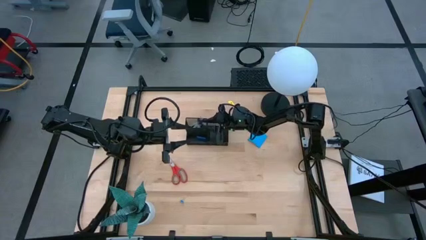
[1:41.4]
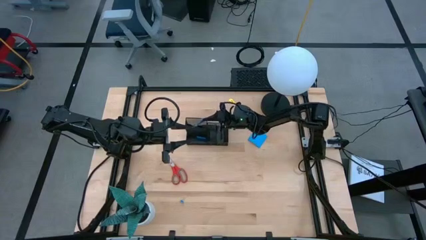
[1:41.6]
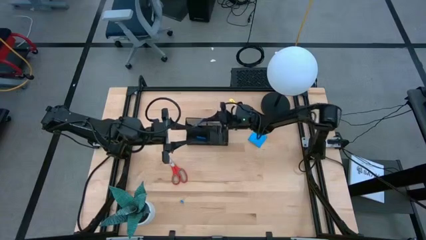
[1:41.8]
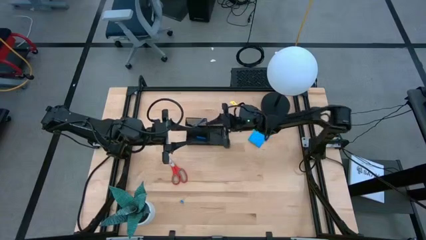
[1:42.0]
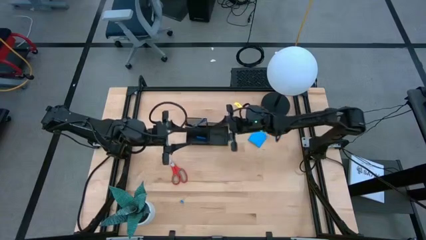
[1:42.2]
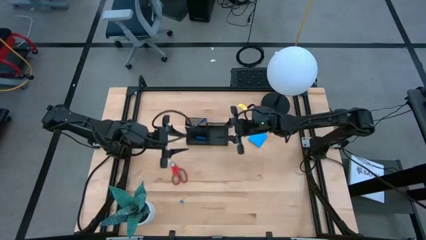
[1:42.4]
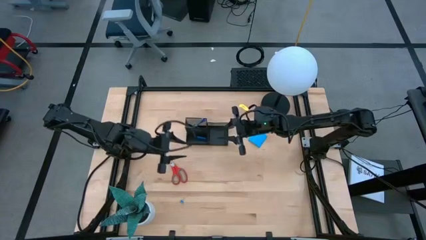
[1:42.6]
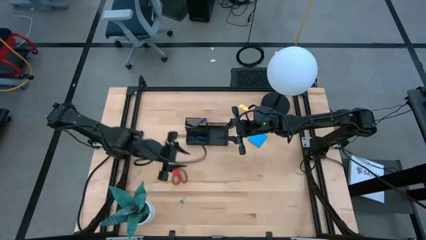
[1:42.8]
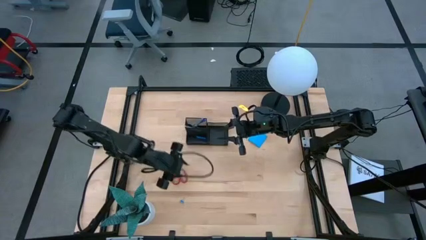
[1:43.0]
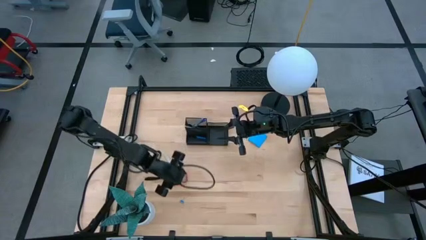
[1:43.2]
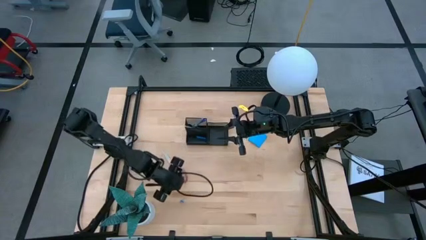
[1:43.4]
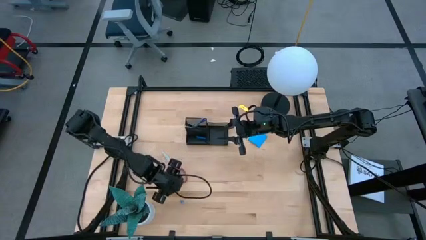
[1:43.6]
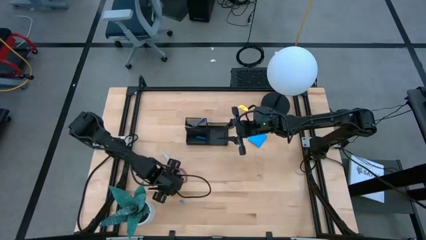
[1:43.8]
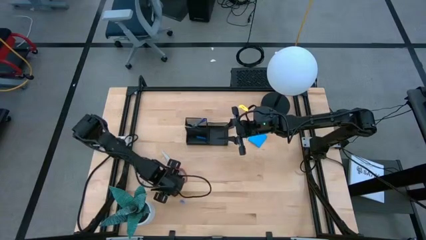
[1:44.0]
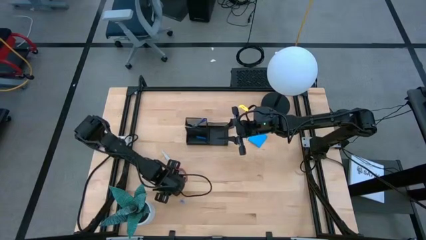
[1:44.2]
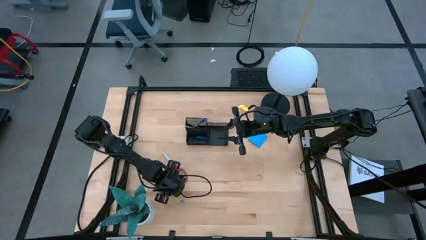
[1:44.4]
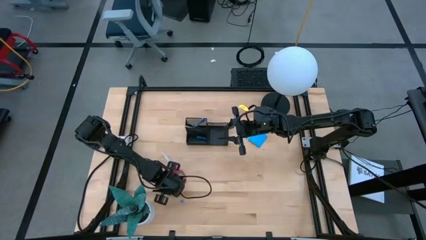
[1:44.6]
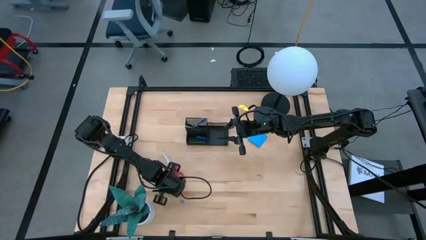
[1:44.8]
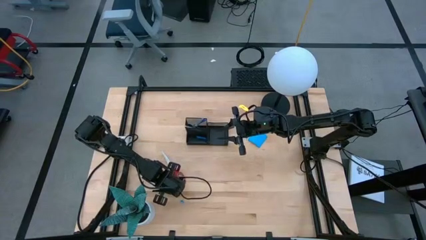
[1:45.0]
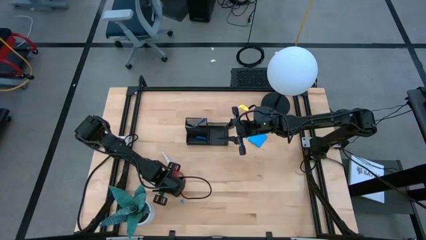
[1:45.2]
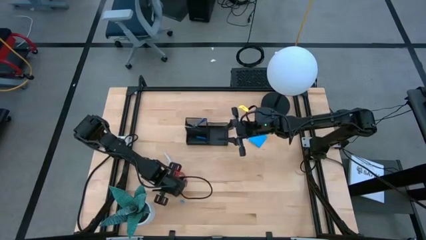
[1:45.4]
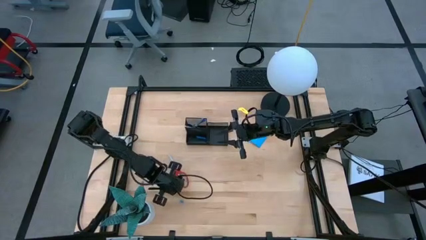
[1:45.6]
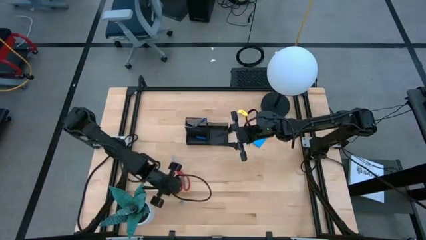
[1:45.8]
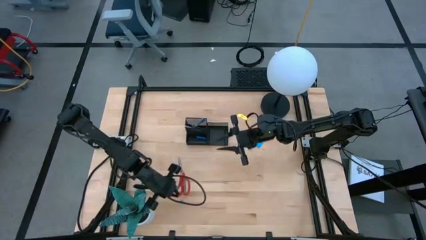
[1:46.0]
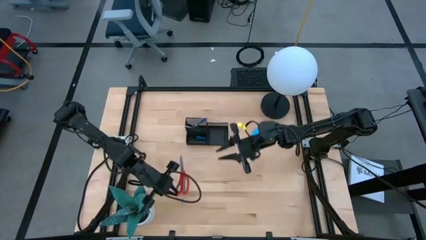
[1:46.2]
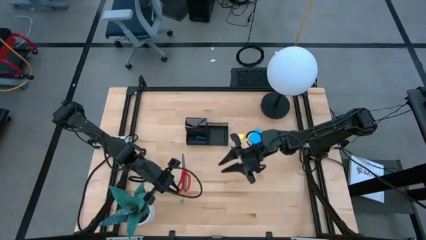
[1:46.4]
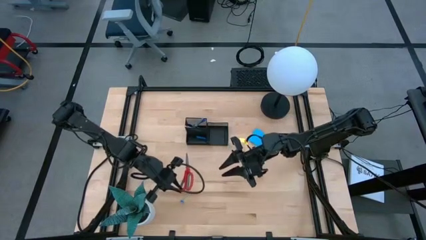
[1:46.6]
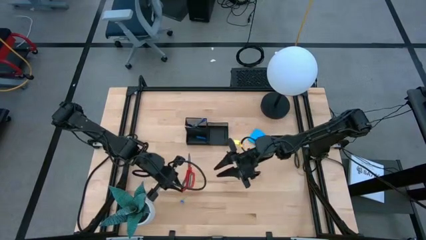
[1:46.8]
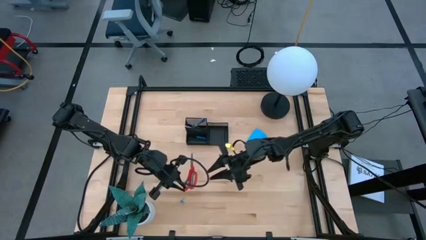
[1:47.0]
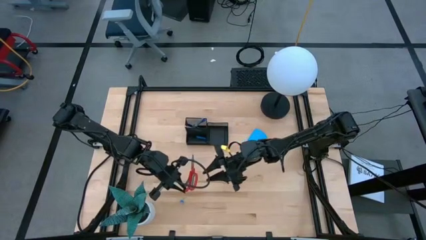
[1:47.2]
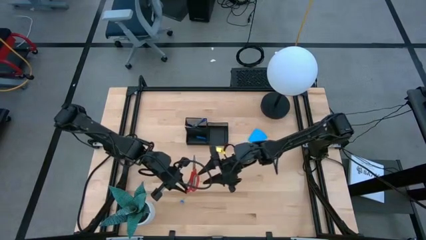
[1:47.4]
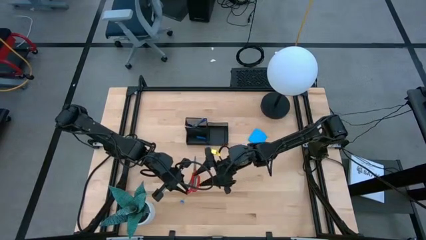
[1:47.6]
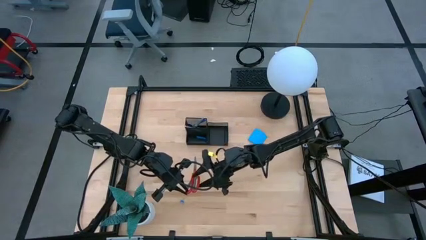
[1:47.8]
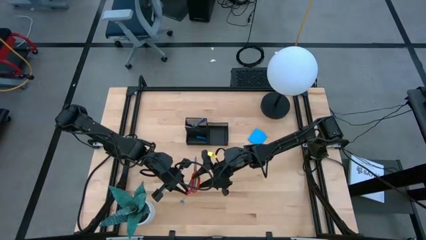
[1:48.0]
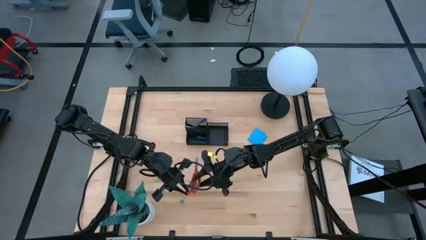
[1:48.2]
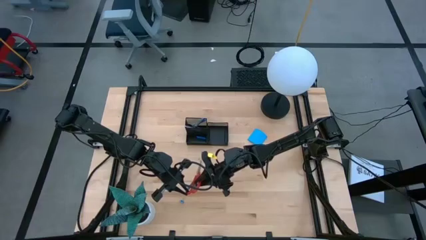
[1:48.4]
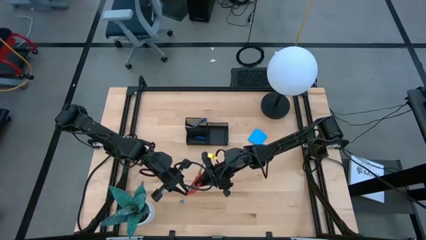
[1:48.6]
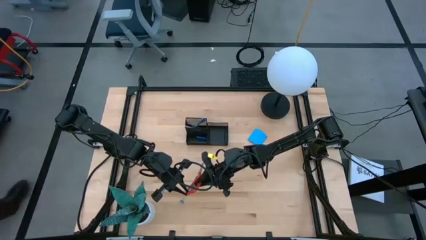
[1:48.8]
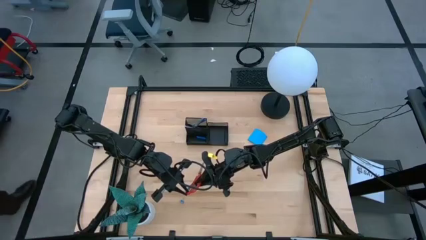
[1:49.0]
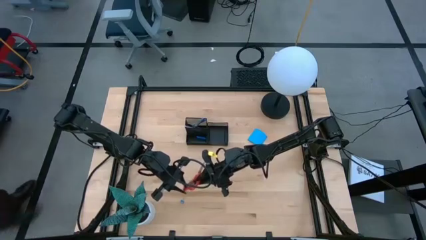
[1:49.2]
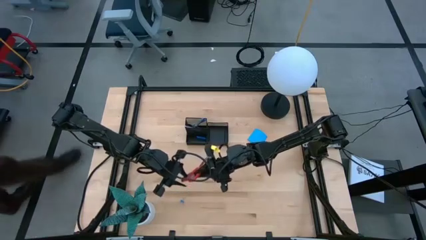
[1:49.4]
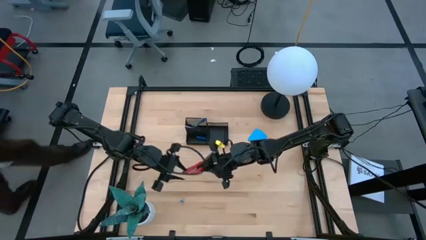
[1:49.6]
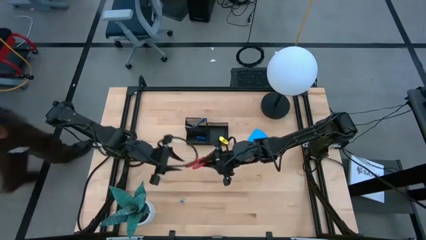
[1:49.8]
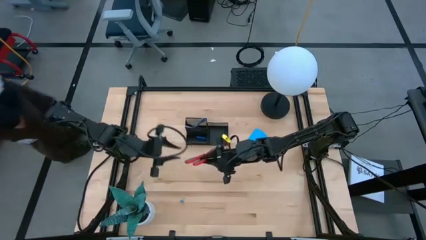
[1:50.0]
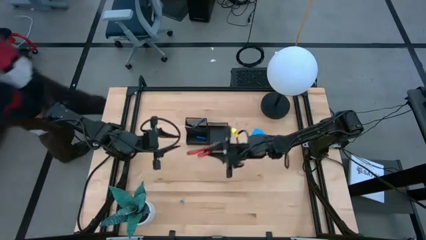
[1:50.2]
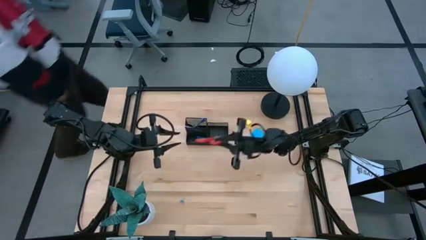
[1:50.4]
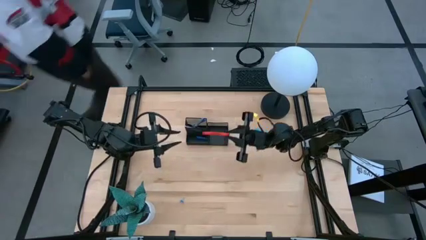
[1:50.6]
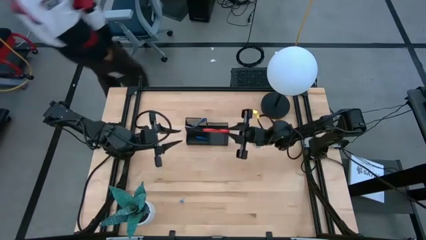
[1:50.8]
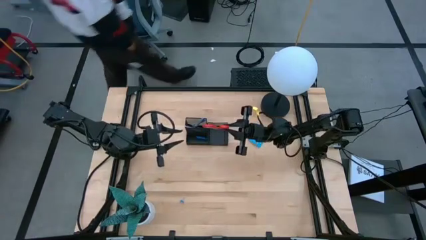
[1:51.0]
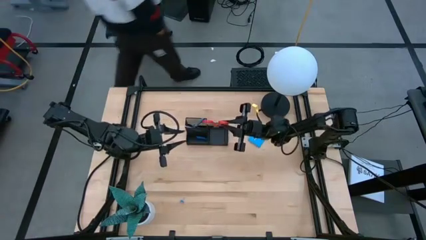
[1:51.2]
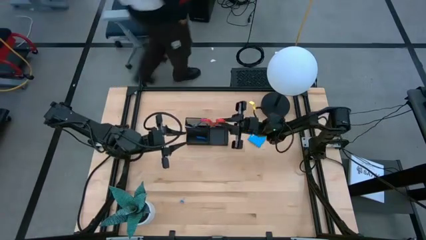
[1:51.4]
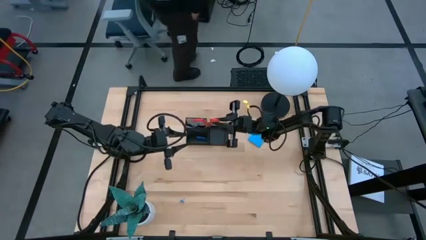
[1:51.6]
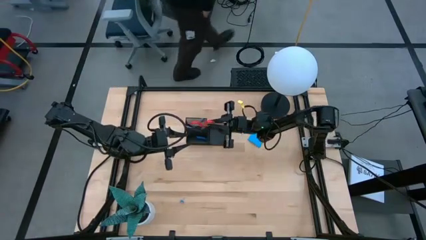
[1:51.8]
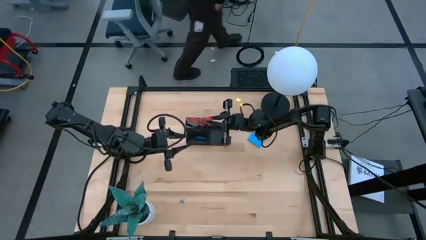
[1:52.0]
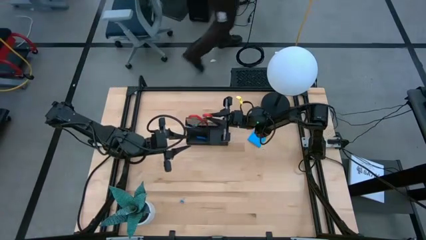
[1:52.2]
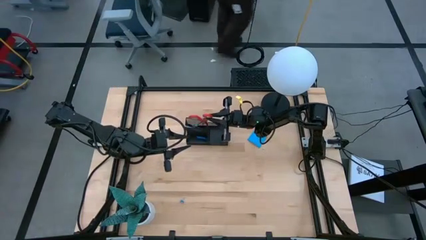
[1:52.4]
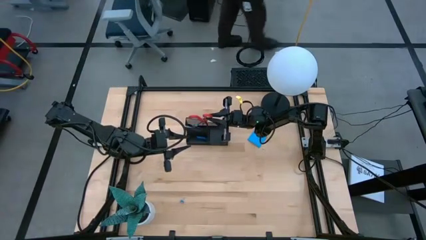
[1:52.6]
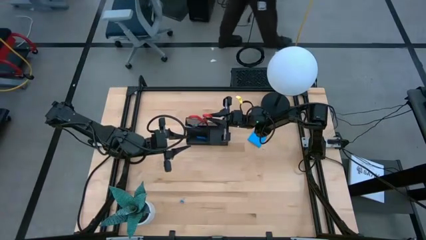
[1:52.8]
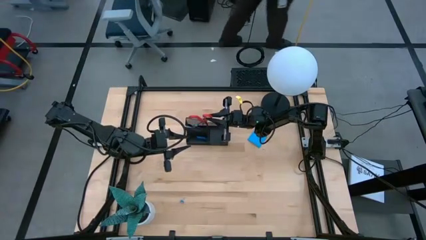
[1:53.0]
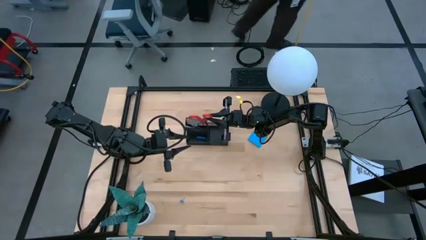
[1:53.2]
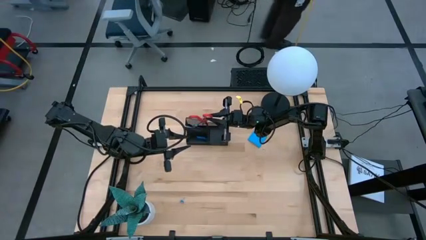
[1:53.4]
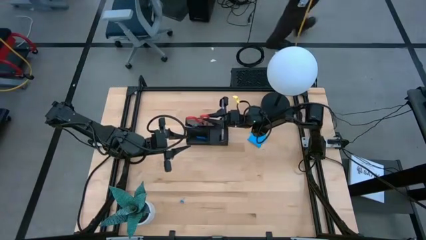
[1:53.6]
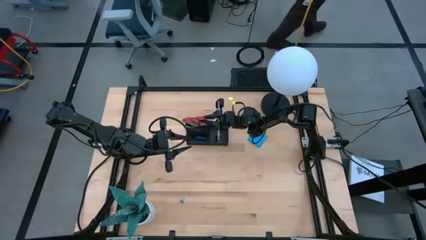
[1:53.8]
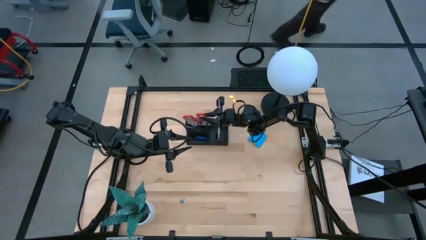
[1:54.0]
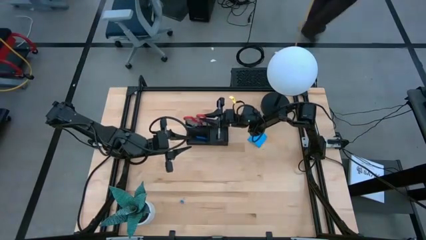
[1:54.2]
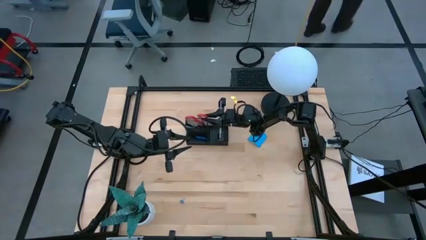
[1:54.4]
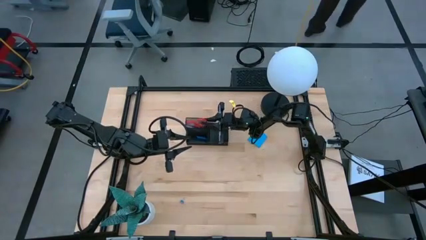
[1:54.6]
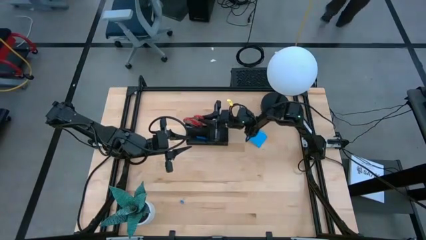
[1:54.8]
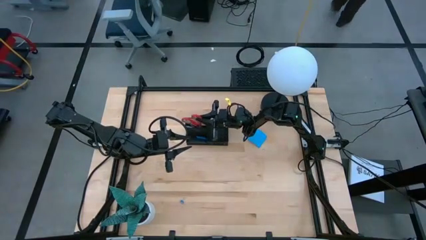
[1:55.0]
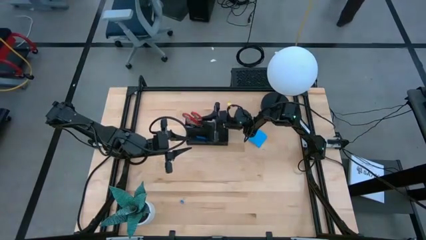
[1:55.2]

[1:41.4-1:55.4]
Task: Pick and place office supplies into organizer
Put the red scissors into the desk organizer

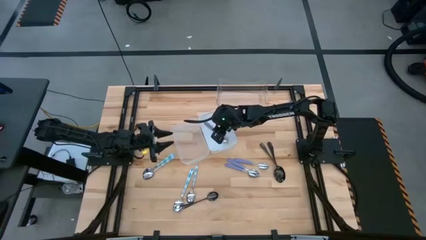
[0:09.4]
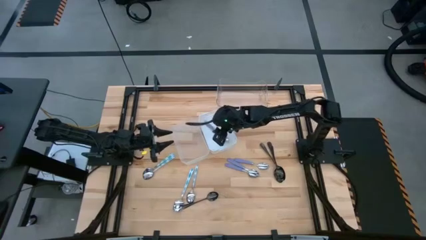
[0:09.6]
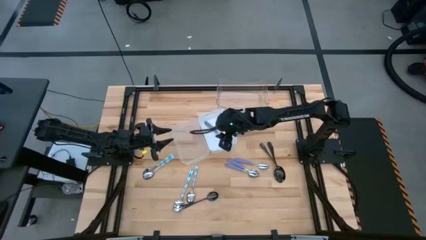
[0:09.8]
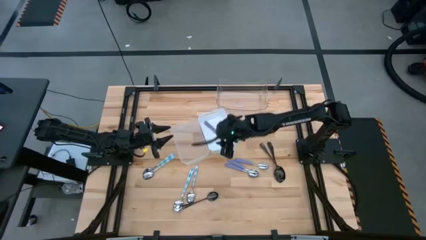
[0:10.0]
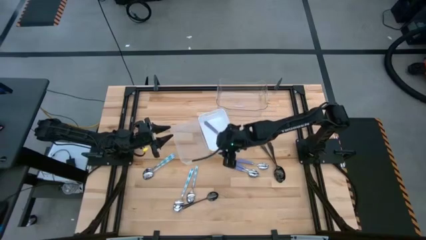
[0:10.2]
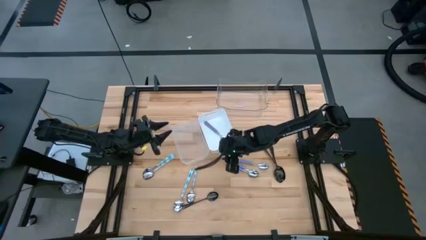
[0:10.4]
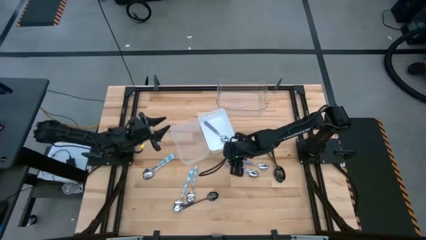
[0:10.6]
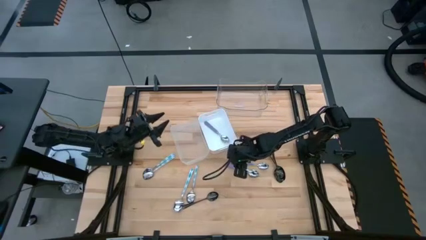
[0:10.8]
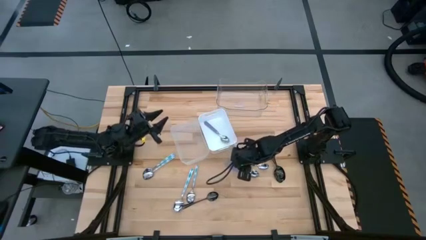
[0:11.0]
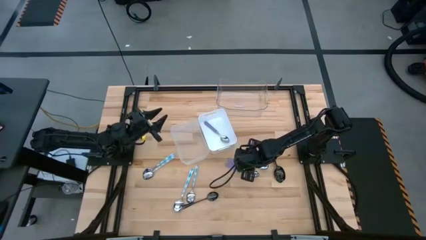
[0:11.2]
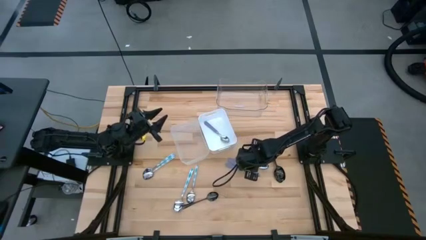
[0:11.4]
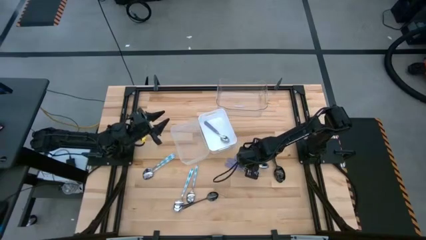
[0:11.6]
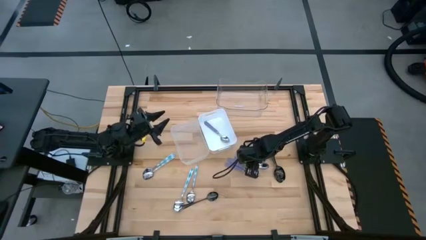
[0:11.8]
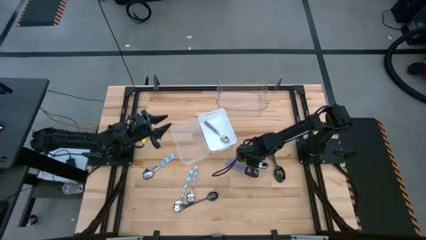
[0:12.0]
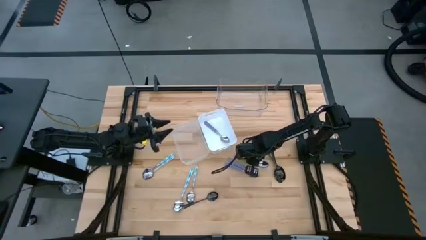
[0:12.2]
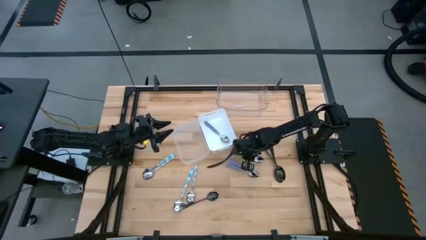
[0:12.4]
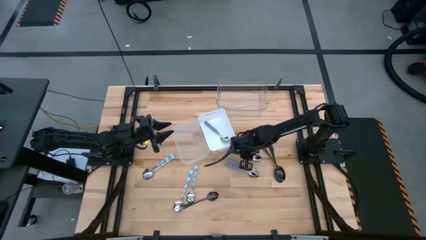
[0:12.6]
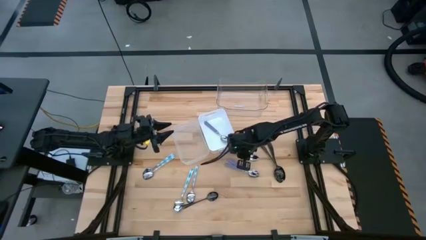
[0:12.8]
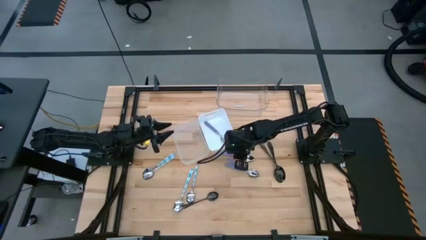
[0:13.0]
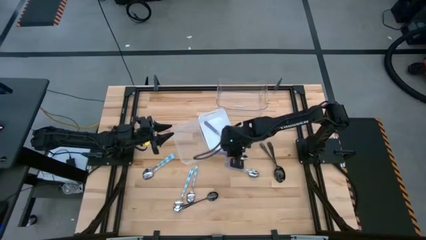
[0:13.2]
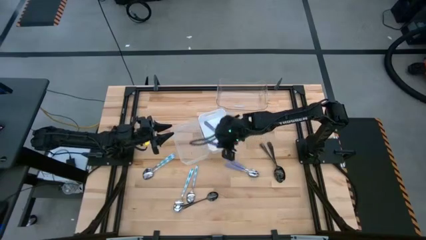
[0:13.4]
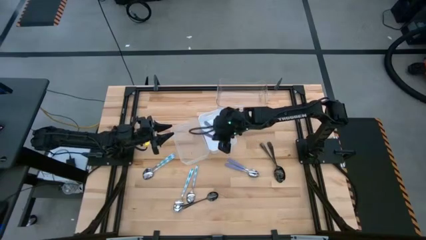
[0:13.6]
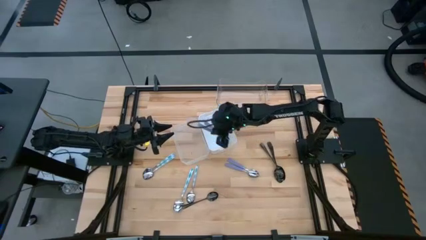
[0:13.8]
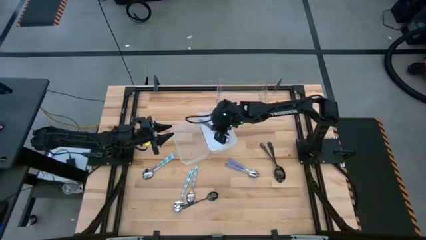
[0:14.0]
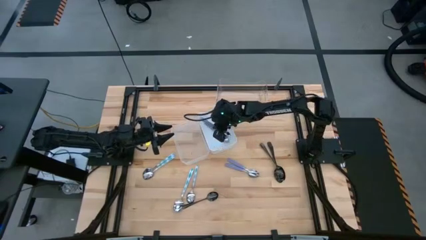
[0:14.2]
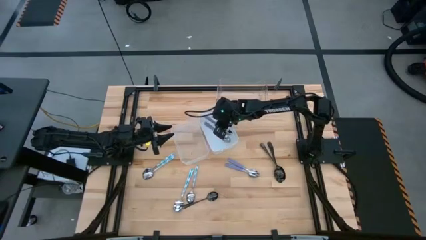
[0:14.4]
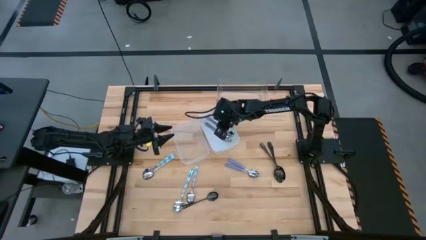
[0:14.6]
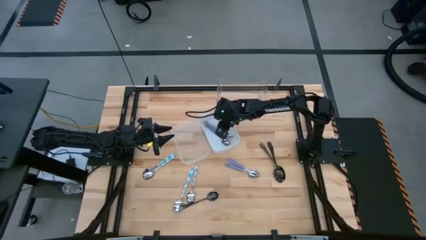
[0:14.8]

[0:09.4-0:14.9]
Task: Sort silverware by color (type)
Put the purple spoon into the white bin
